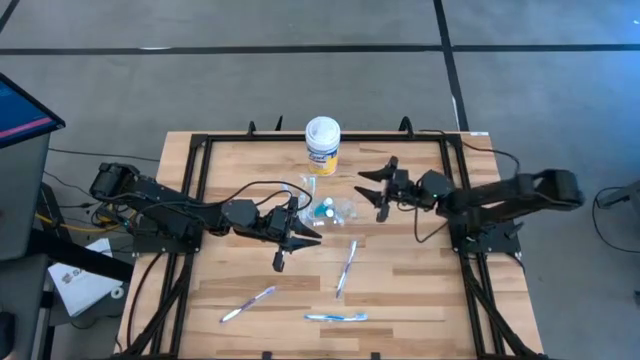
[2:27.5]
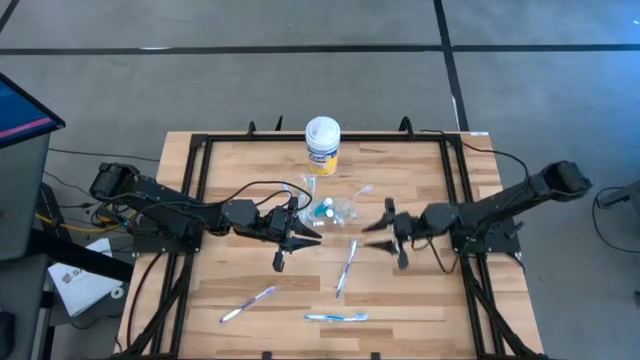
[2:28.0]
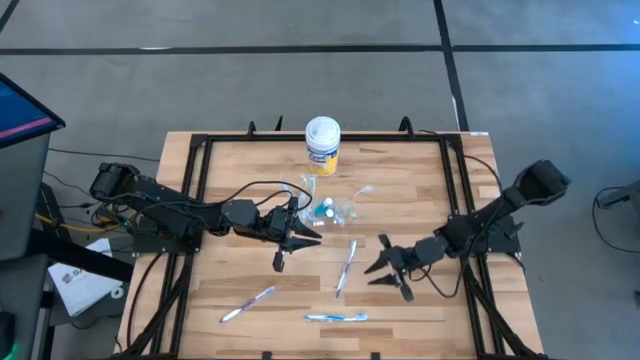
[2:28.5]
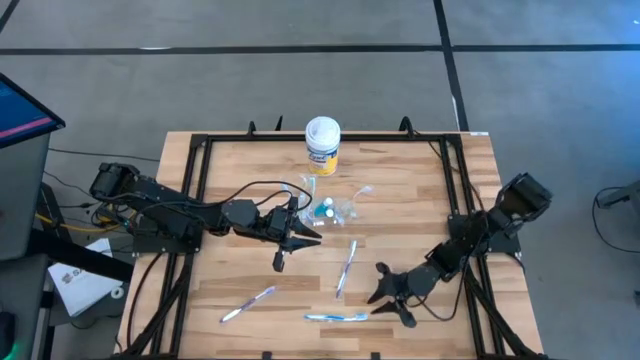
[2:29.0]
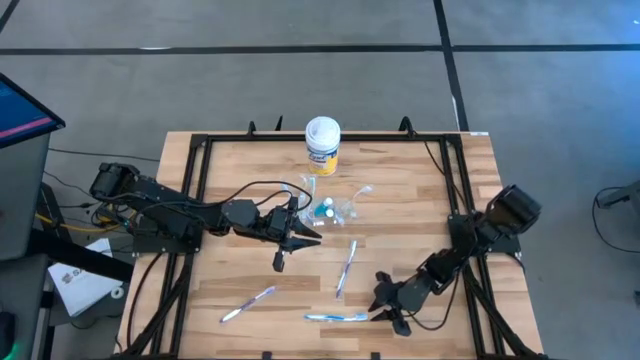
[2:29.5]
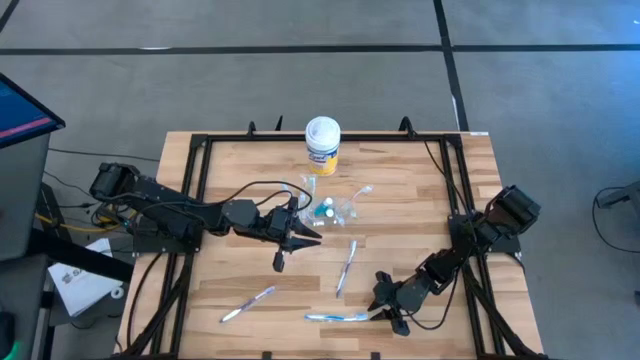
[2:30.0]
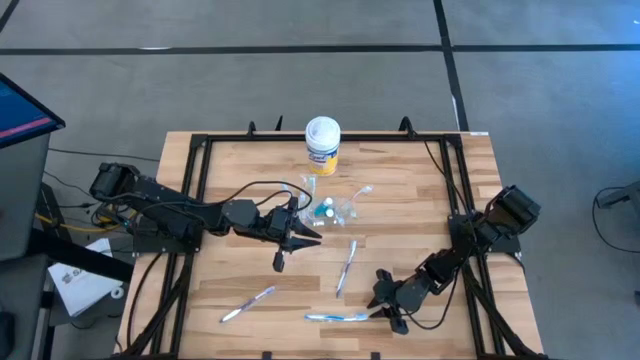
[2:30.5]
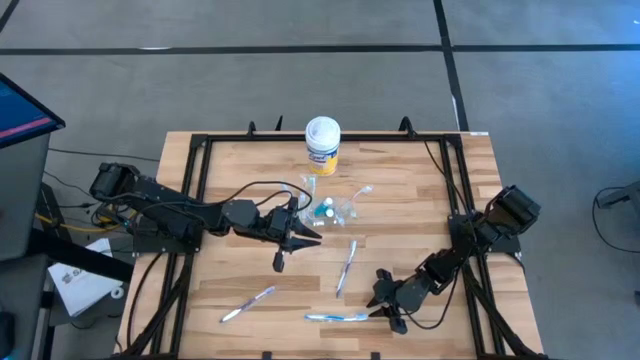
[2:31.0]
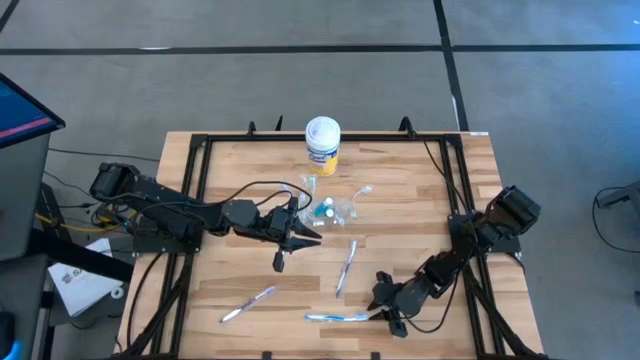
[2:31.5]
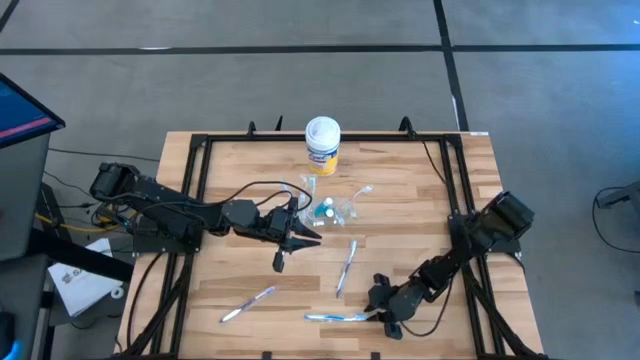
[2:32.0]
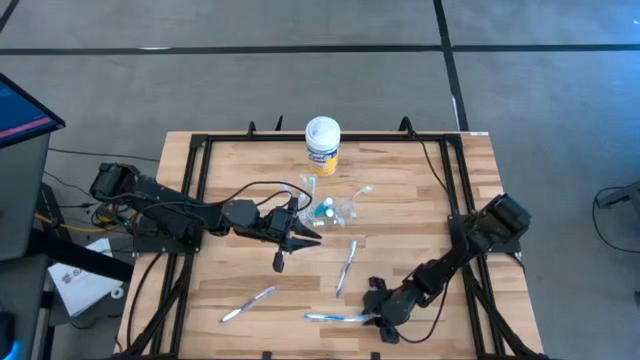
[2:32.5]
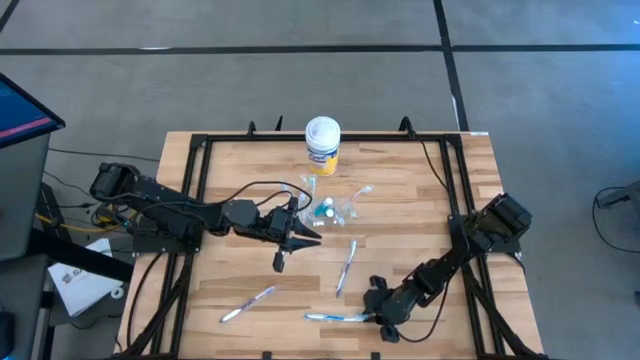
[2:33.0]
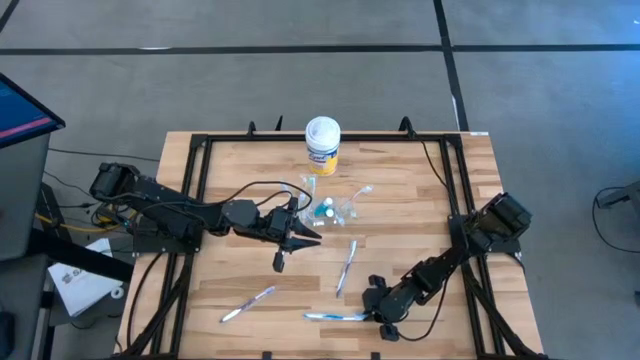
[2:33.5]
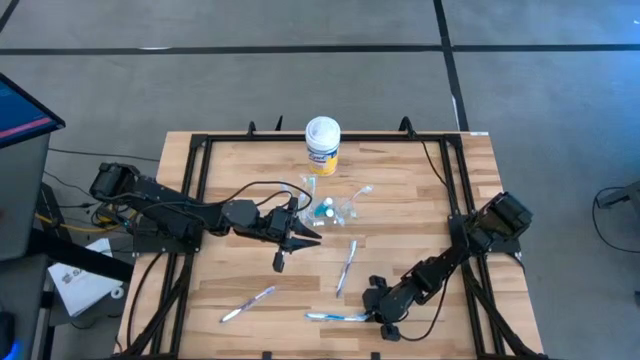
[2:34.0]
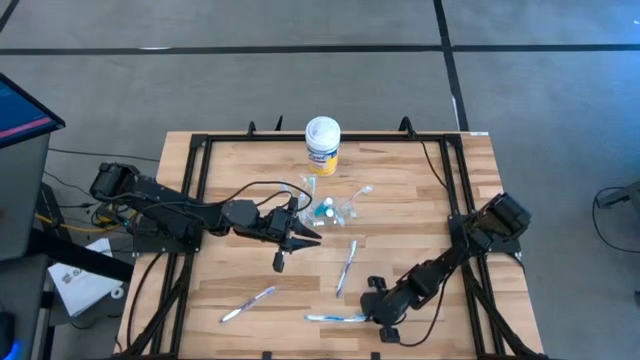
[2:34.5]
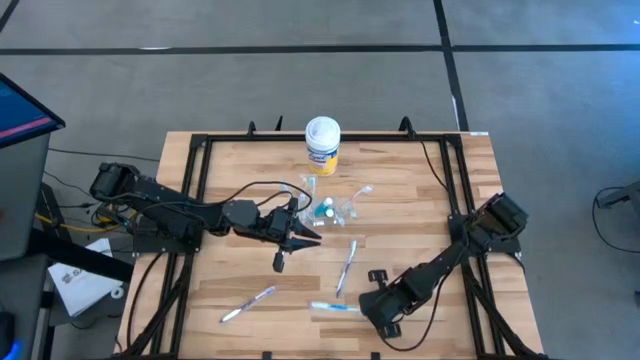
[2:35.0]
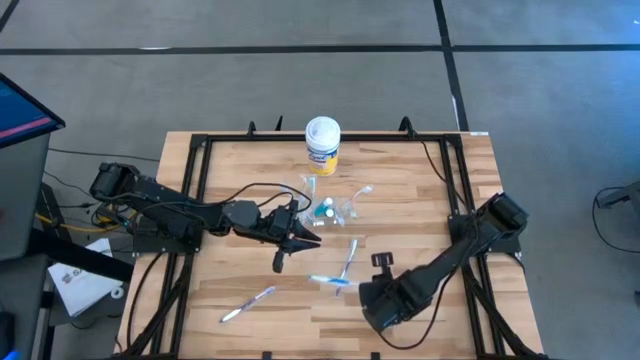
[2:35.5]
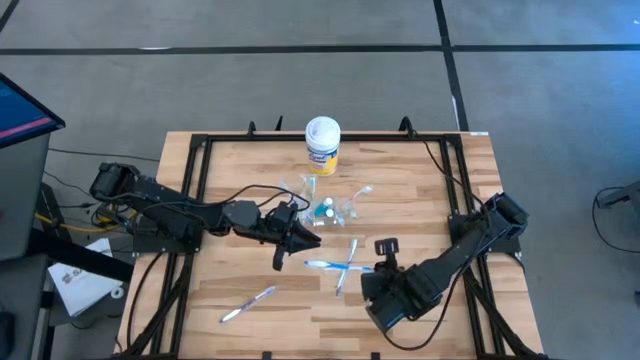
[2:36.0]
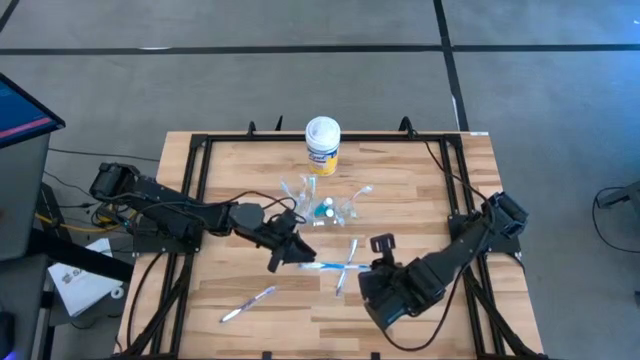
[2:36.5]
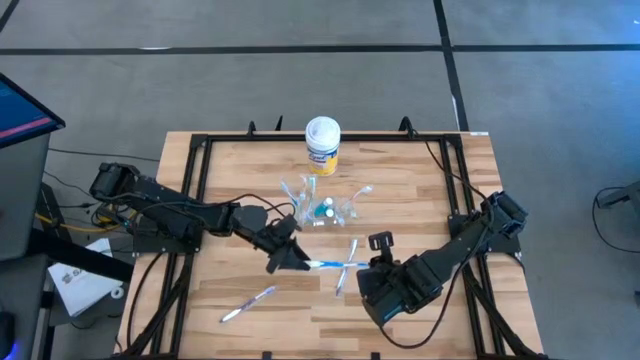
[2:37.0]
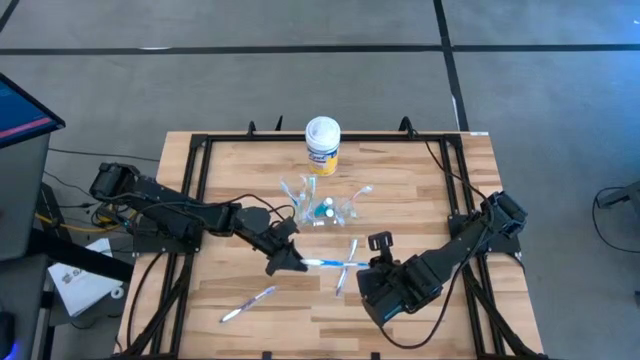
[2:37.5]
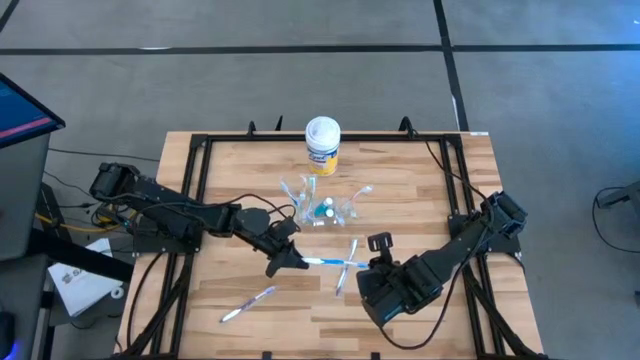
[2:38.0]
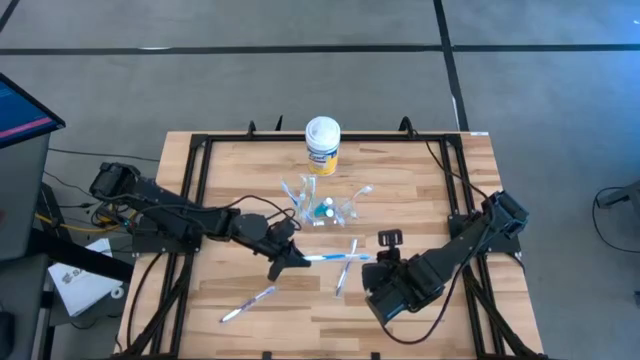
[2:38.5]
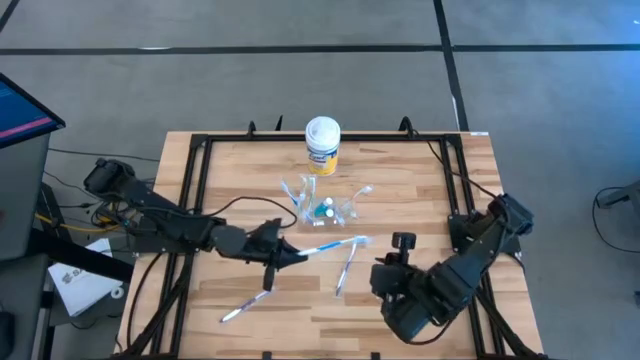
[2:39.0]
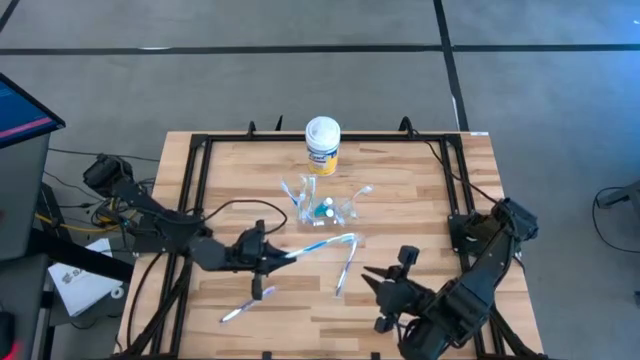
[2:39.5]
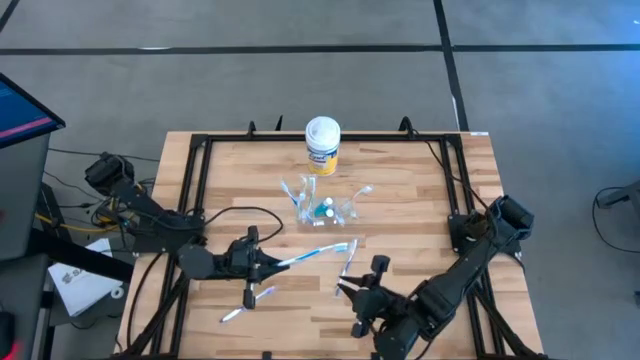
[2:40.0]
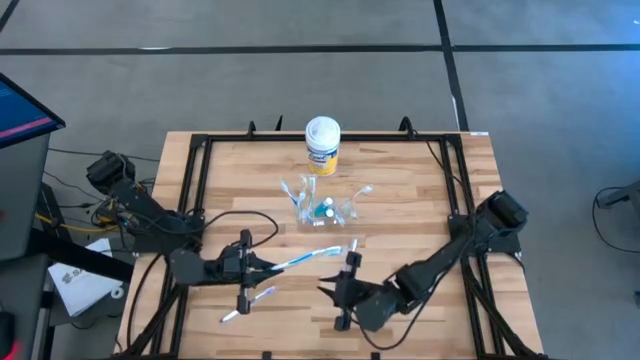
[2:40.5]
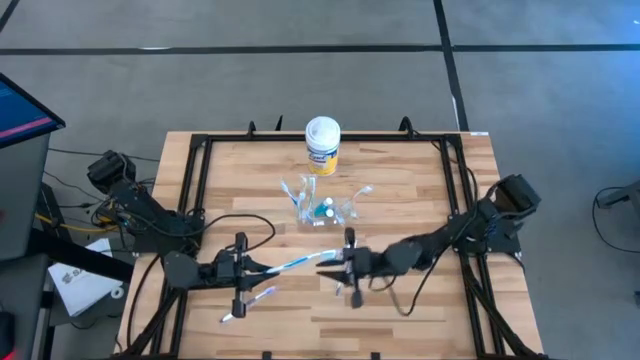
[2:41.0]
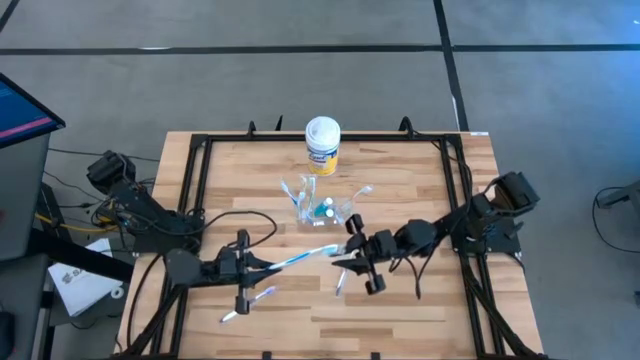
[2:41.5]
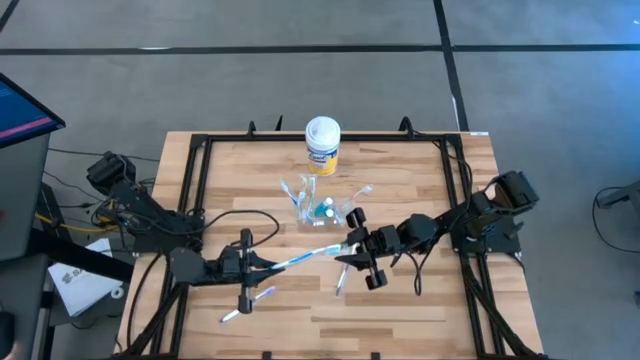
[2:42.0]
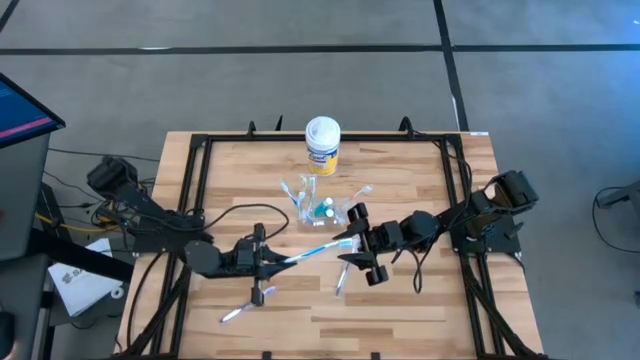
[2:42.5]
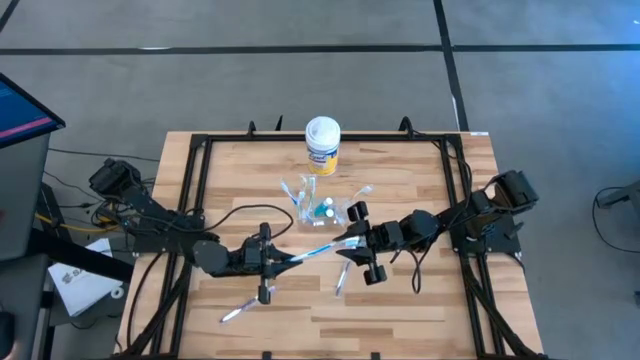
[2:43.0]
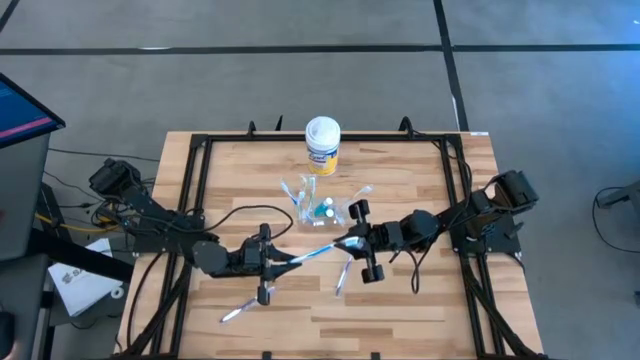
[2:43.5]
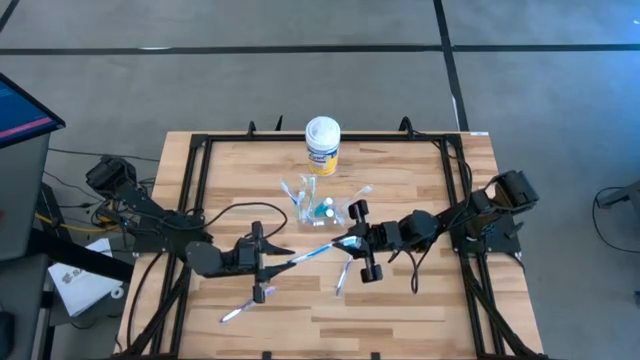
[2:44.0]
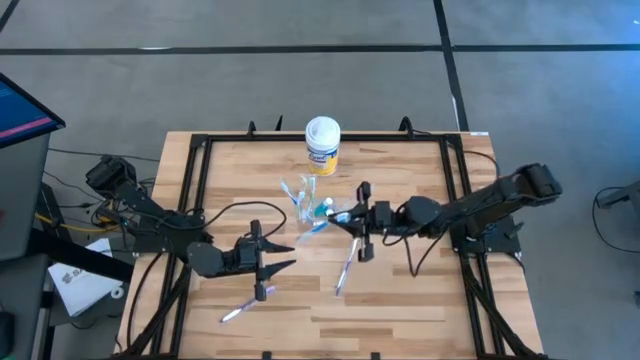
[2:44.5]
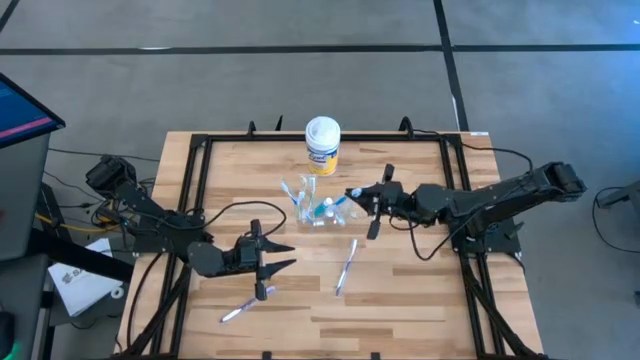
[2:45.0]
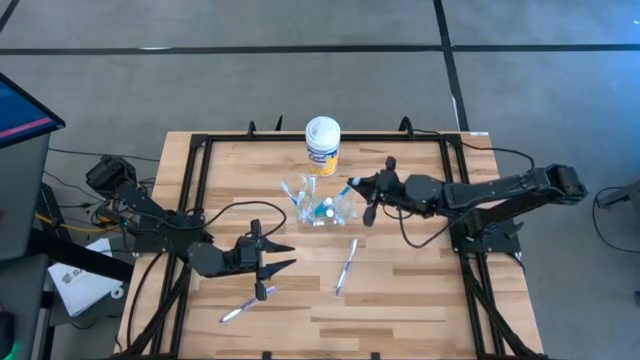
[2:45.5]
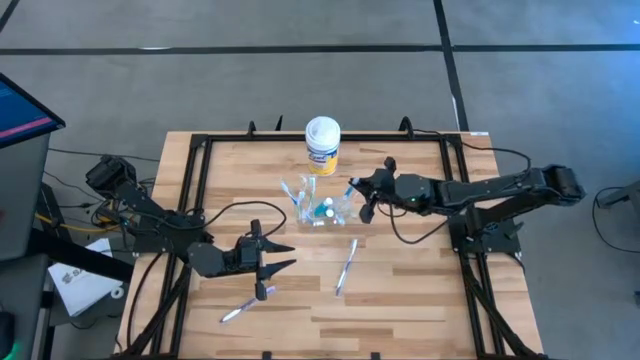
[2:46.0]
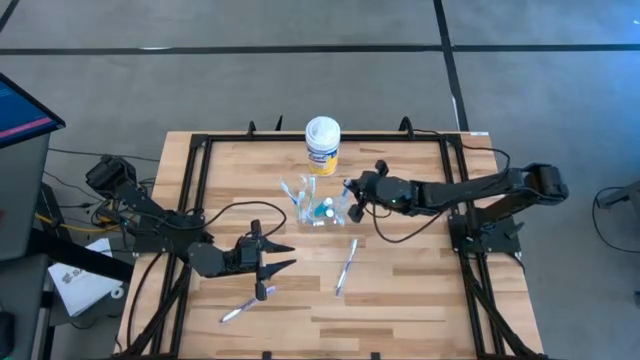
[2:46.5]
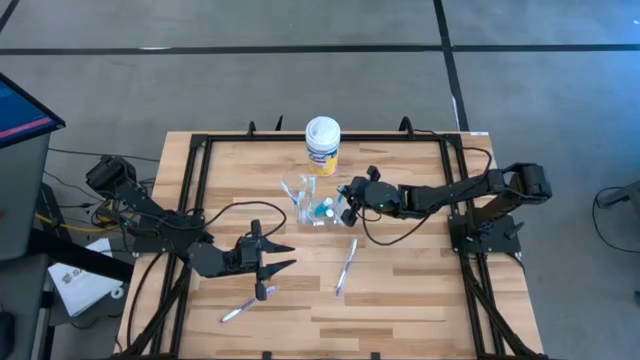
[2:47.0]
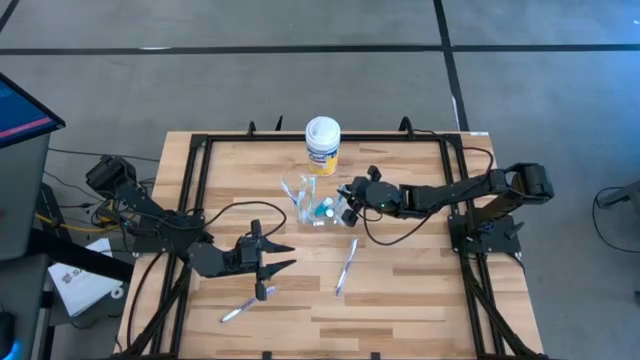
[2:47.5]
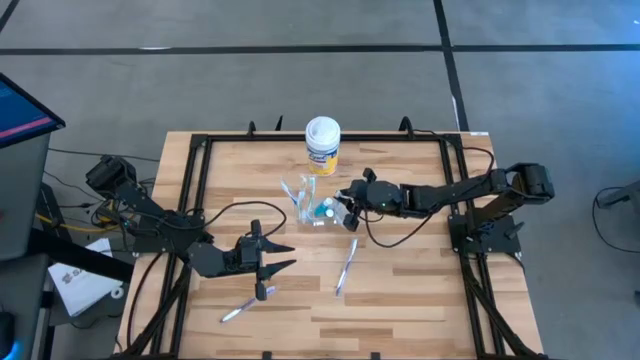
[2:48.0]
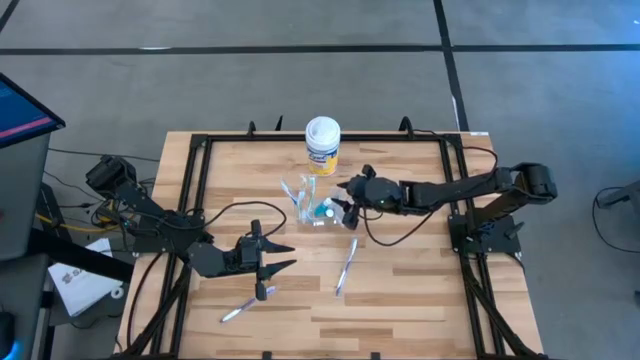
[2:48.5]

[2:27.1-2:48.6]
Task: Pick & Place toothbrushing station
Put the blue toothbrush into the transparent organizer

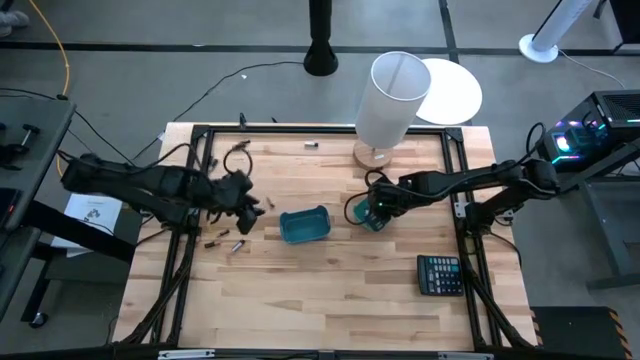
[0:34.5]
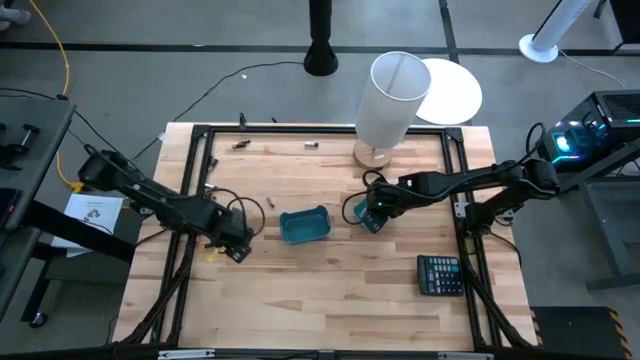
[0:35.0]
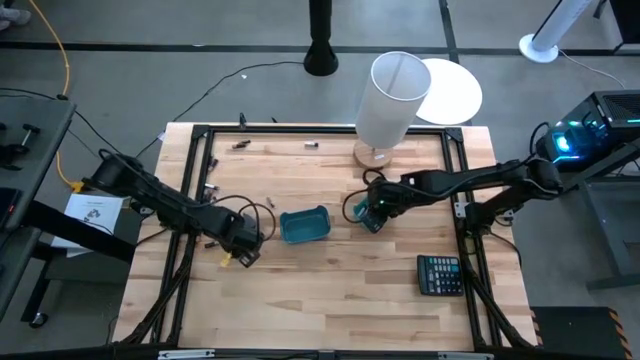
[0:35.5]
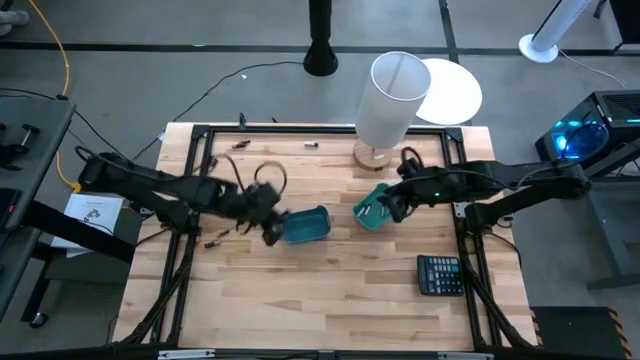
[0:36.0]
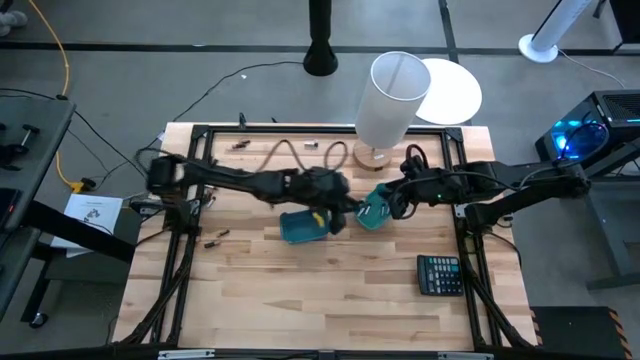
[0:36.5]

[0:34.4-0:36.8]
Task: Sort batteries
Put the silver battery into the green bin
